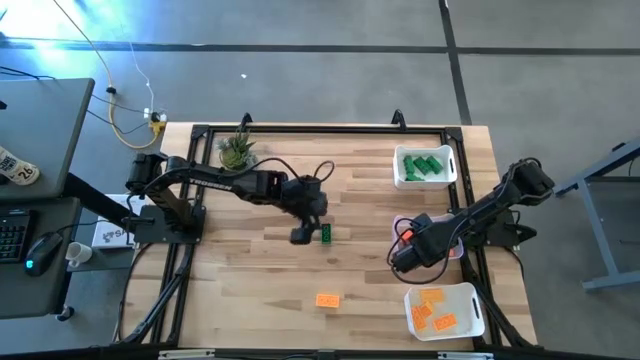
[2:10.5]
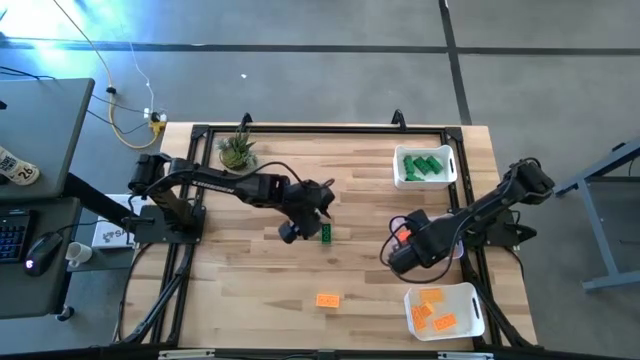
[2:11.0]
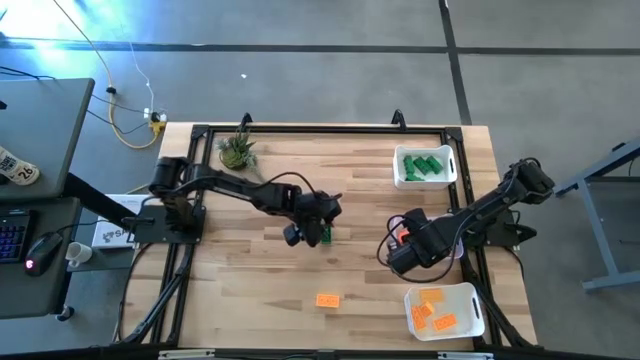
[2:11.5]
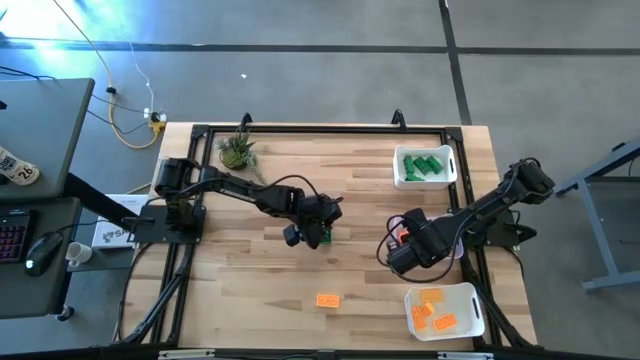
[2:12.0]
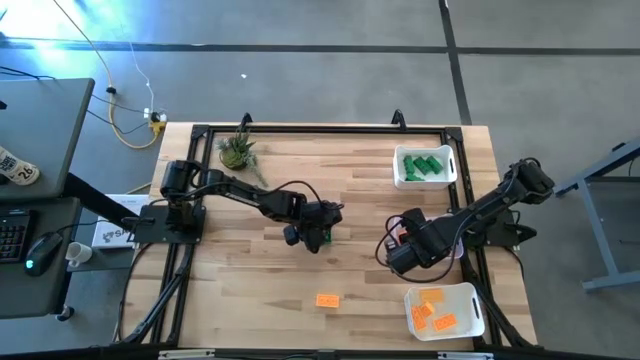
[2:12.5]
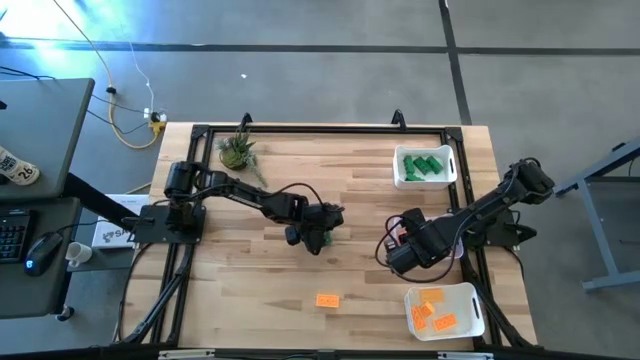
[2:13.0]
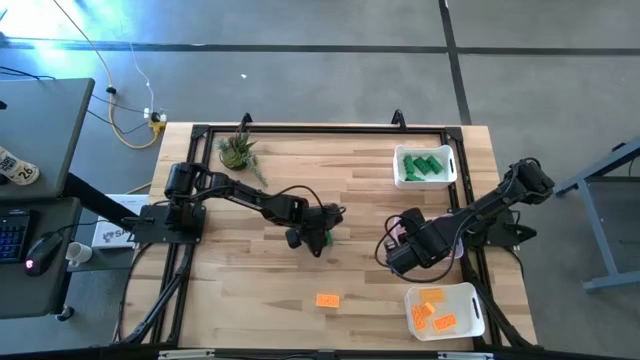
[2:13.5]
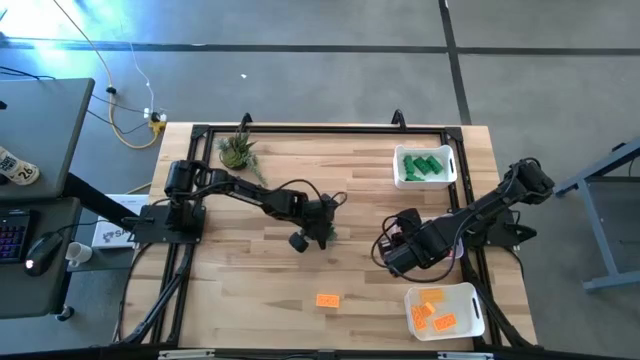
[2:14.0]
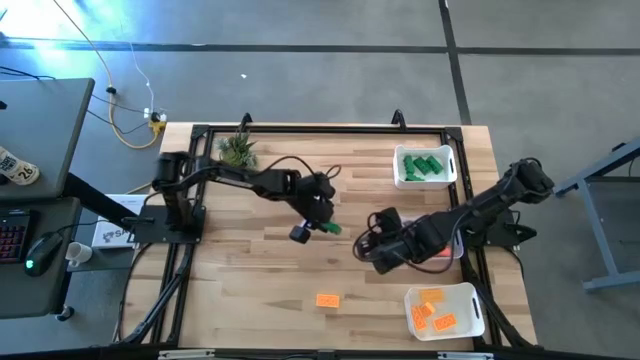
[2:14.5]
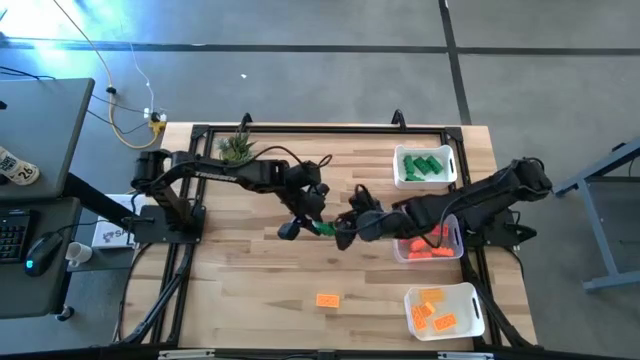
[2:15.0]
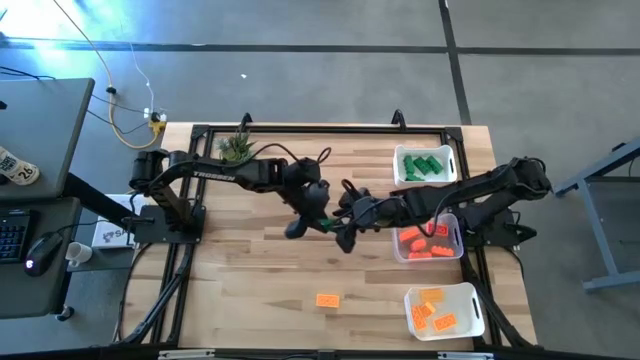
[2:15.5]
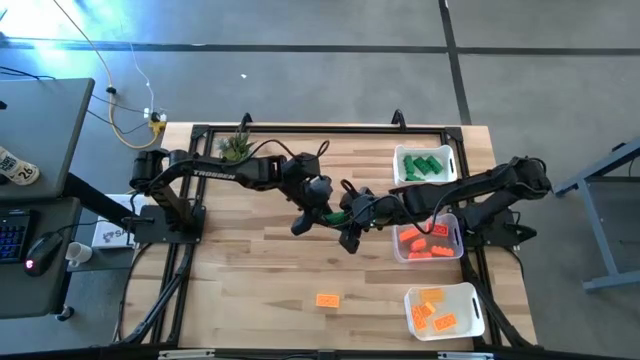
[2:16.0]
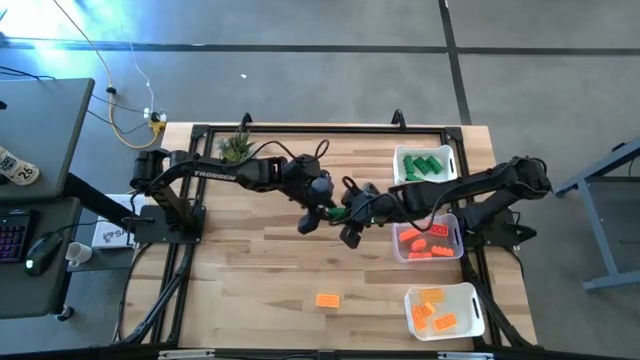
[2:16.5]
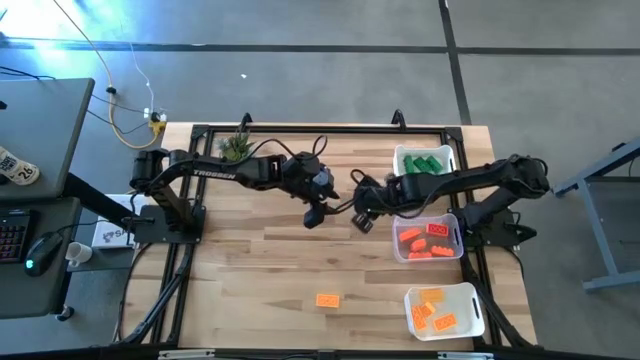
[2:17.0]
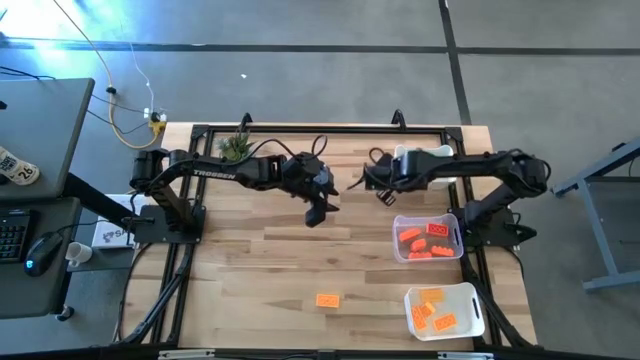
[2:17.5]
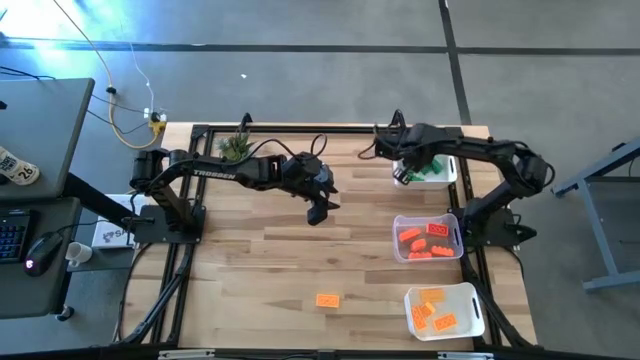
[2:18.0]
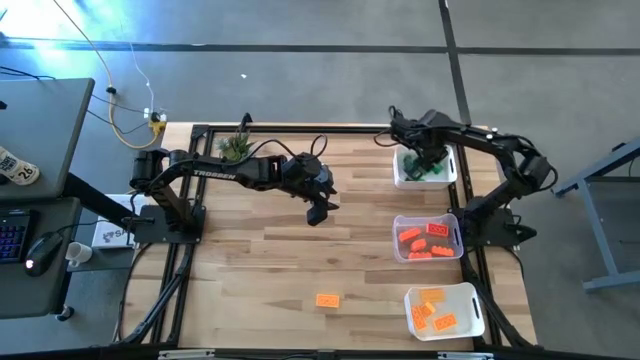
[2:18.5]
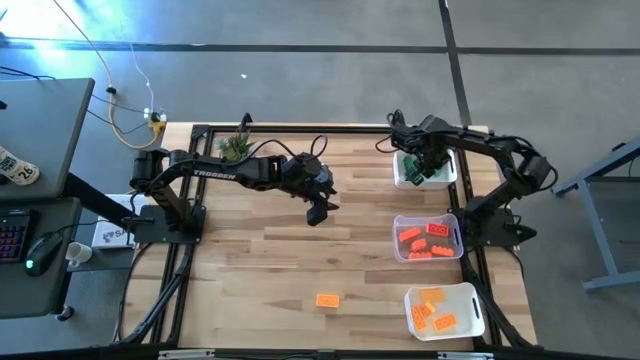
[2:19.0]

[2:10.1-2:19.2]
Task: Sort & place blocks by color
Put the green game piece into the top white bin

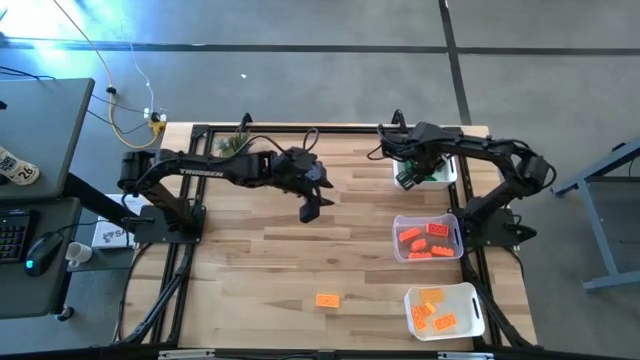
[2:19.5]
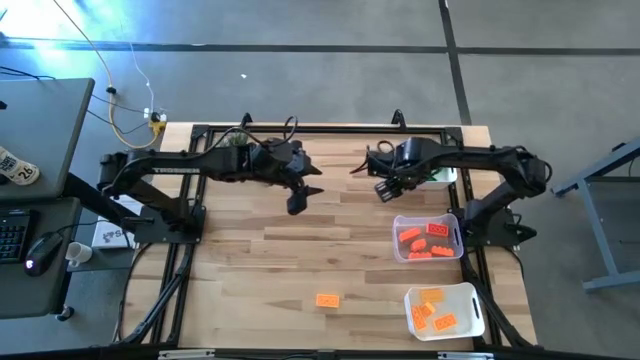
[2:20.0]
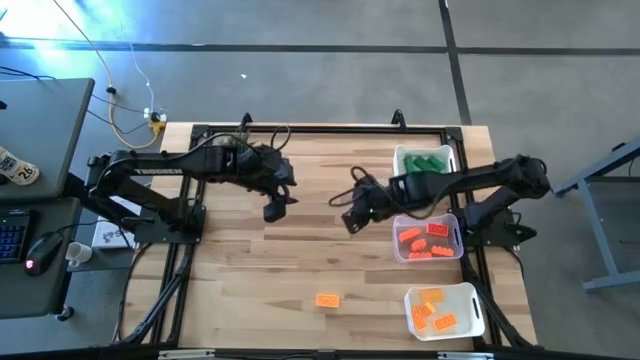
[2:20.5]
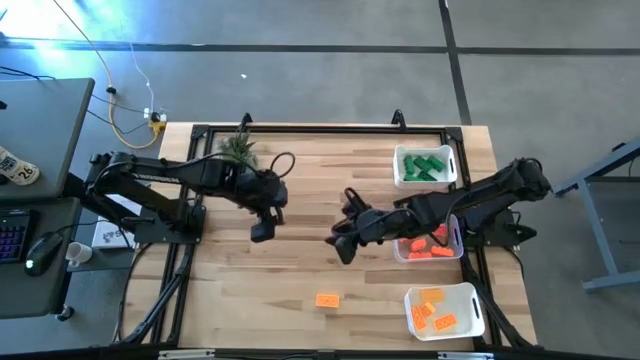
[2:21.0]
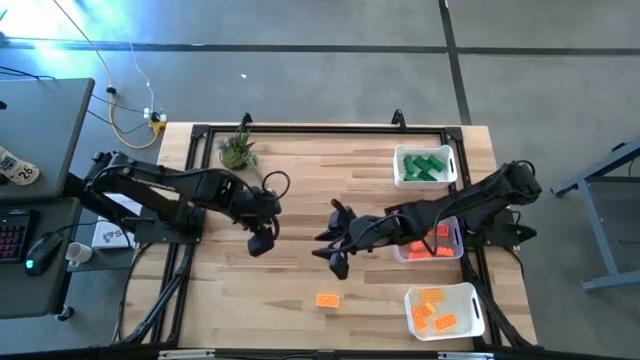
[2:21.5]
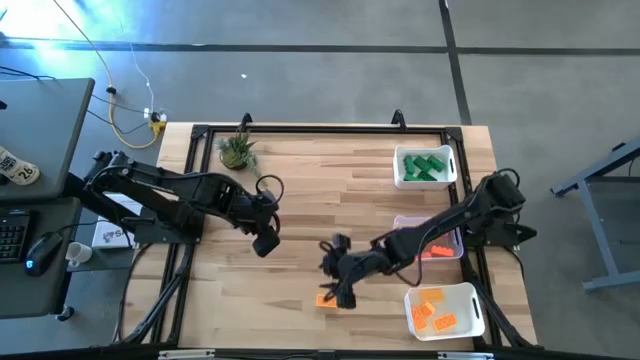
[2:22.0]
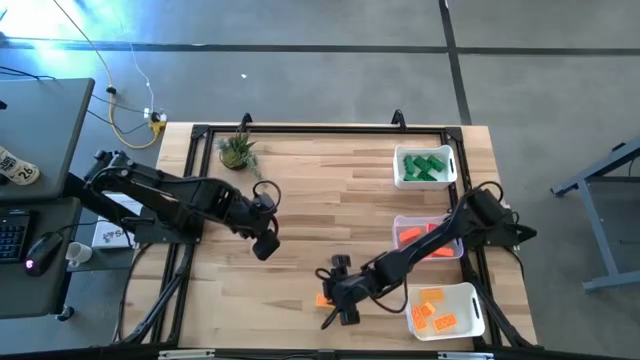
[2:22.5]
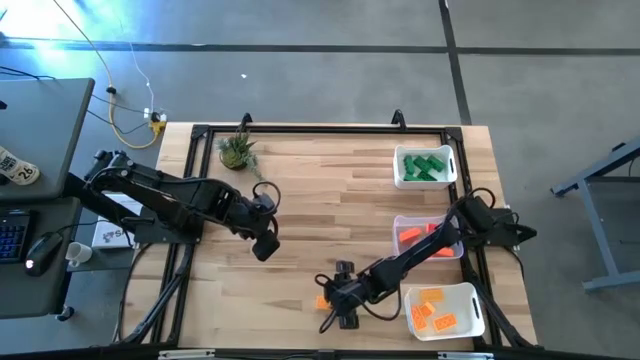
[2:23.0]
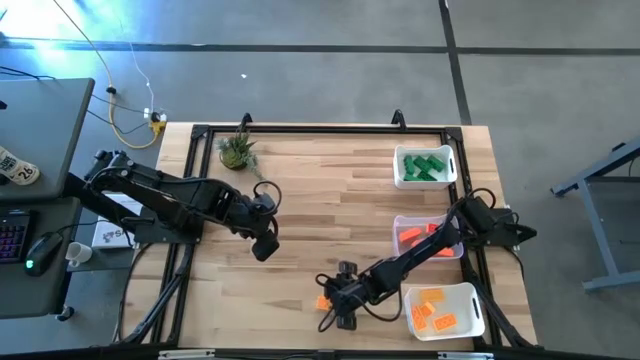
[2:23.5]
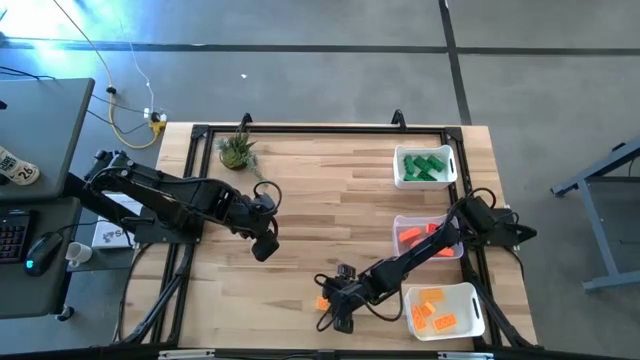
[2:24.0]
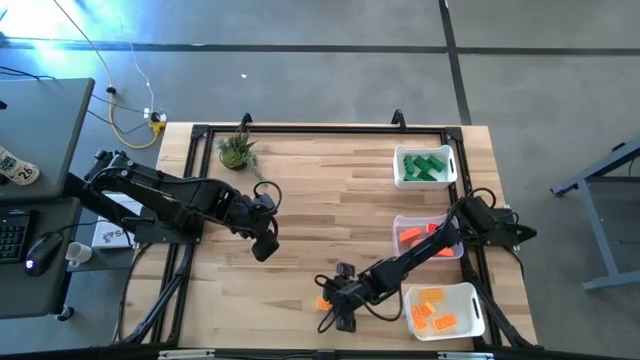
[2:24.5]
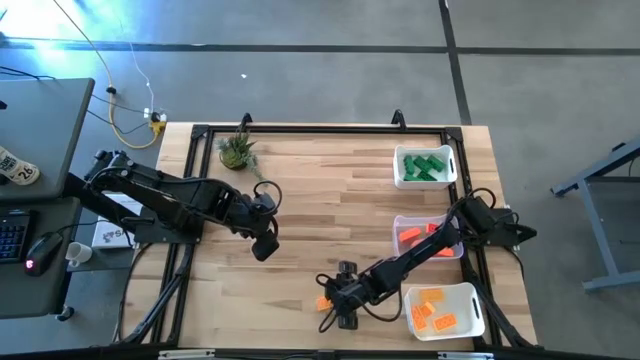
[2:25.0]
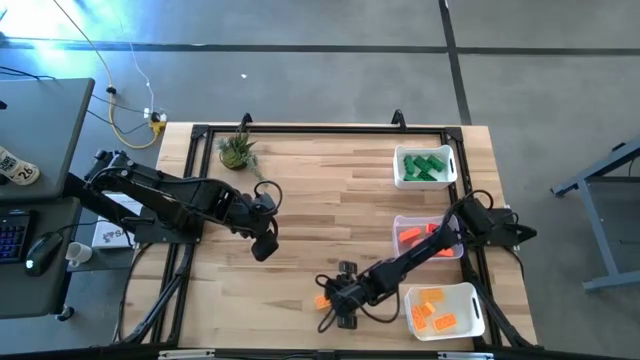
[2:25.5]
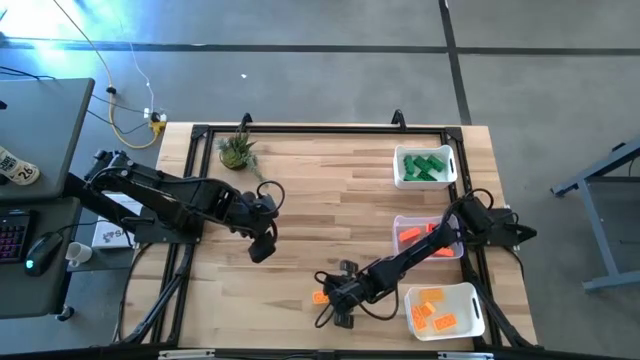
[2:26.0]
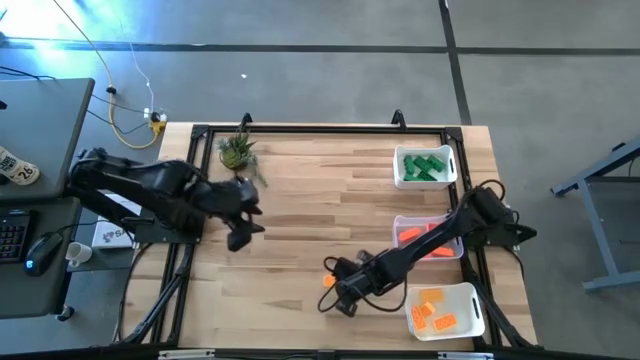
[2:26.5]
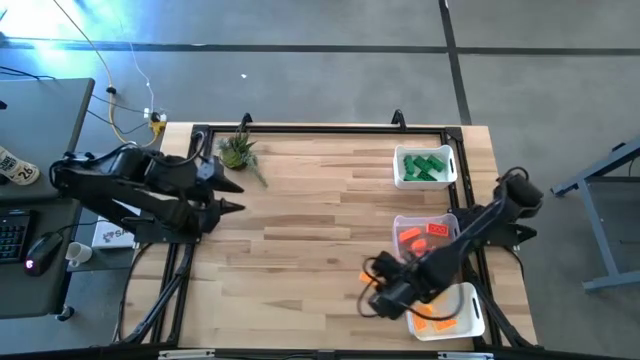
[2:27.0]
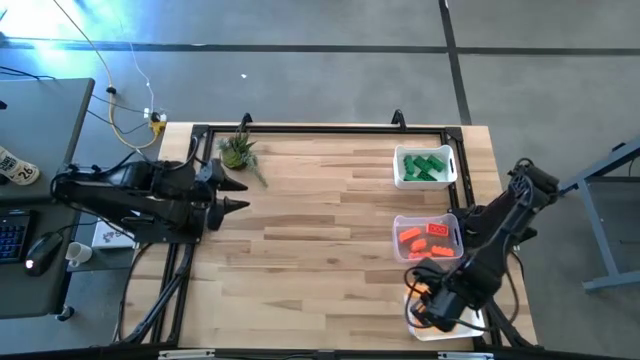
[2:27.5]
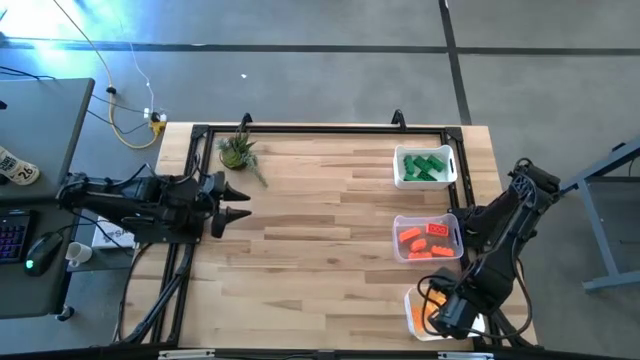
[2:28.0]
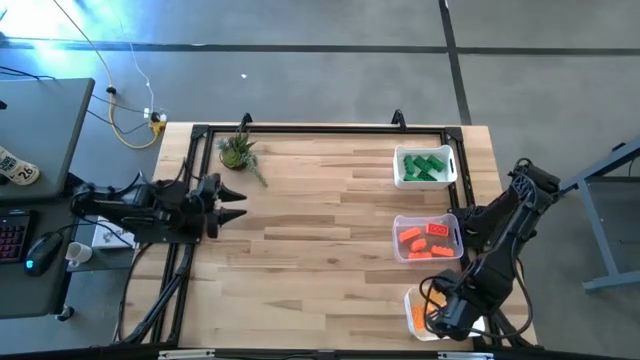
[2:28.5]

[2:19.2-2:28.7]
Put the yellow game piece into the bottom white bin
